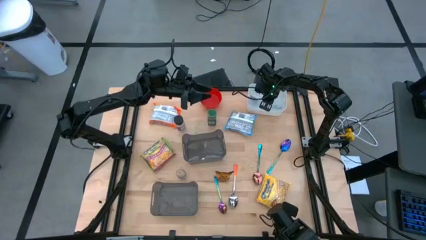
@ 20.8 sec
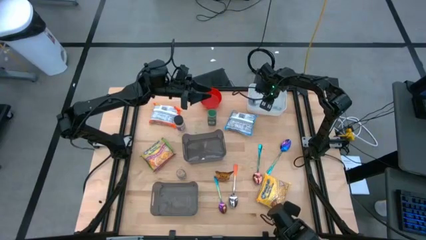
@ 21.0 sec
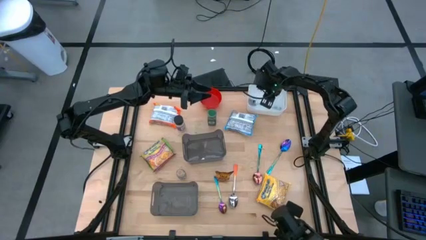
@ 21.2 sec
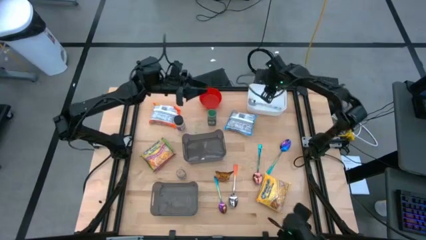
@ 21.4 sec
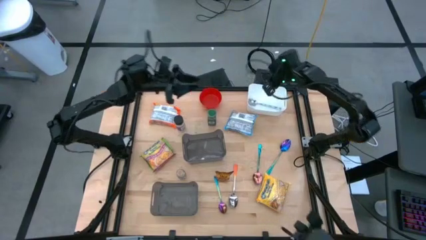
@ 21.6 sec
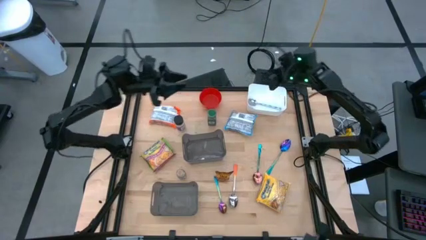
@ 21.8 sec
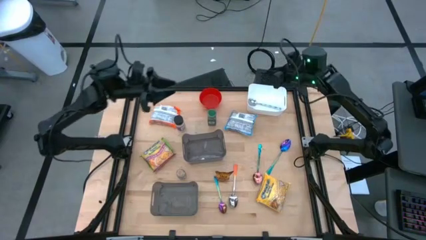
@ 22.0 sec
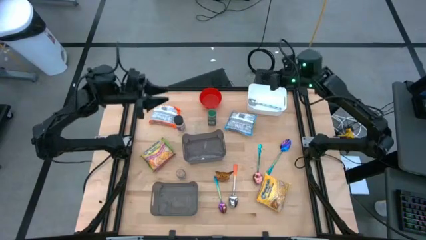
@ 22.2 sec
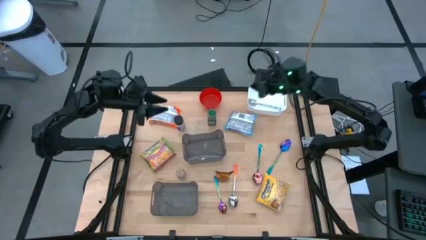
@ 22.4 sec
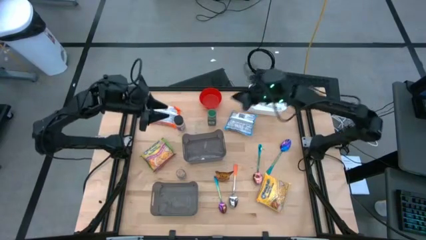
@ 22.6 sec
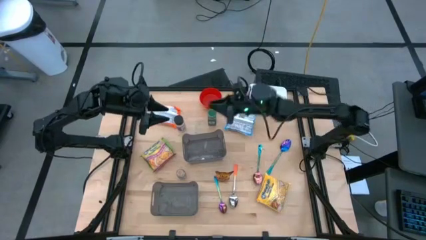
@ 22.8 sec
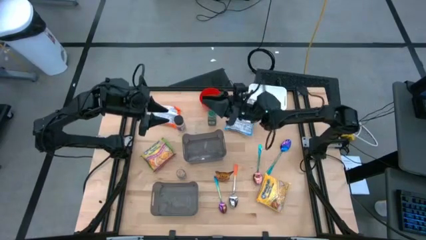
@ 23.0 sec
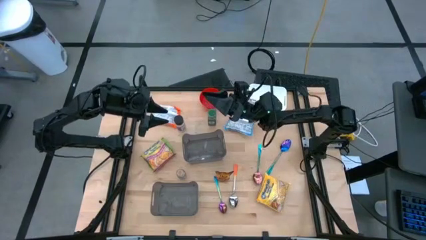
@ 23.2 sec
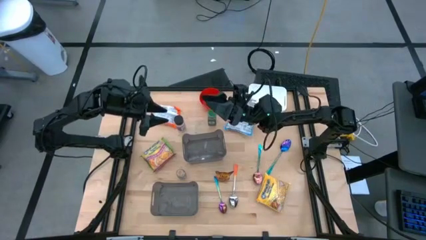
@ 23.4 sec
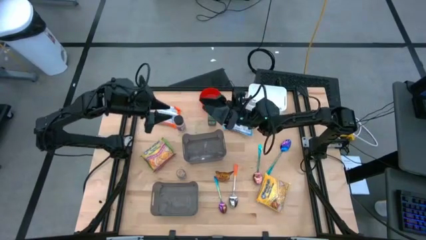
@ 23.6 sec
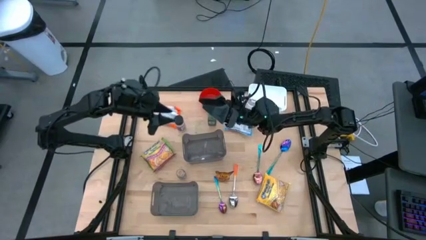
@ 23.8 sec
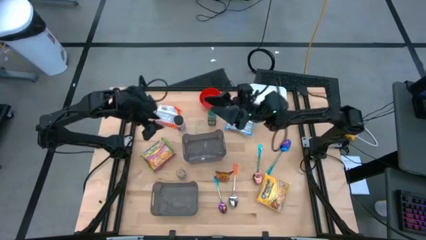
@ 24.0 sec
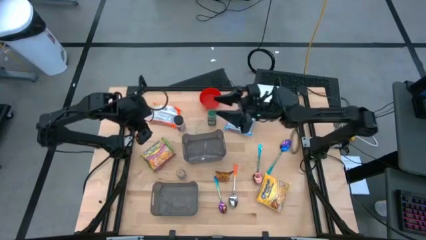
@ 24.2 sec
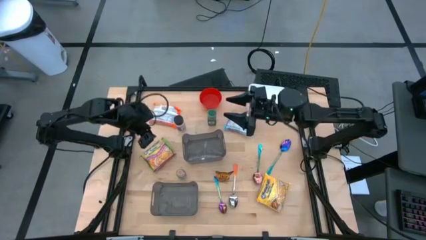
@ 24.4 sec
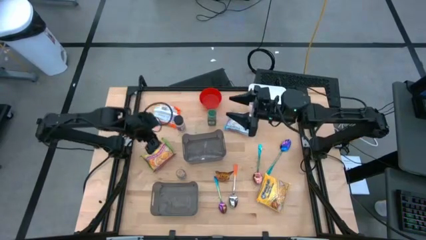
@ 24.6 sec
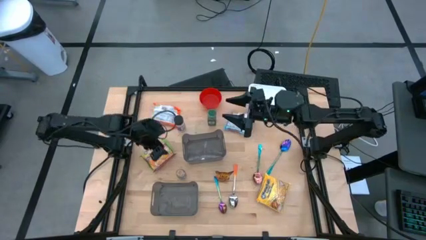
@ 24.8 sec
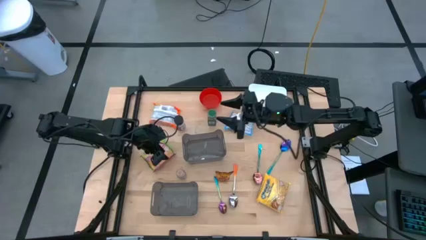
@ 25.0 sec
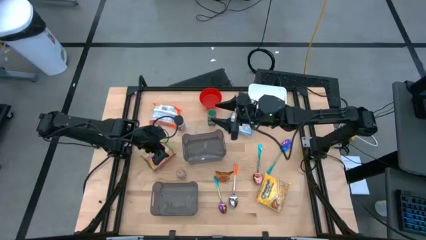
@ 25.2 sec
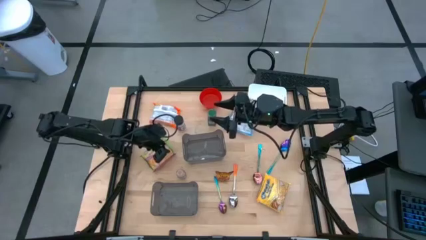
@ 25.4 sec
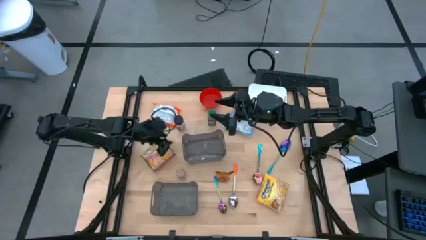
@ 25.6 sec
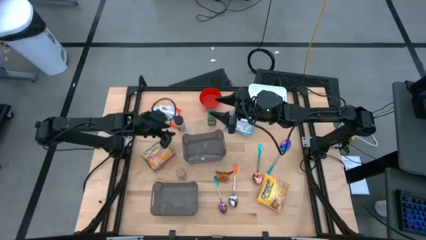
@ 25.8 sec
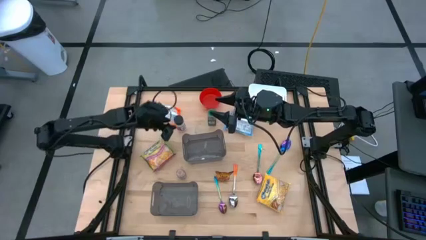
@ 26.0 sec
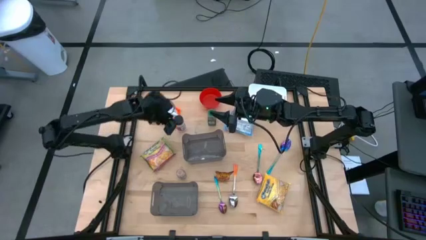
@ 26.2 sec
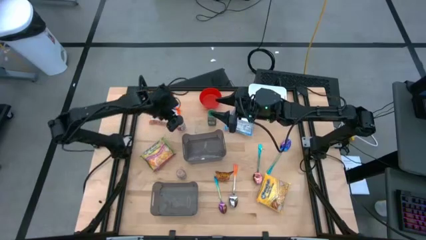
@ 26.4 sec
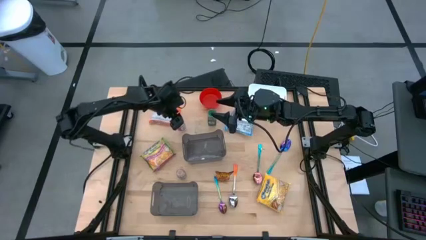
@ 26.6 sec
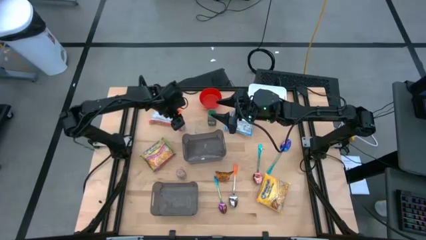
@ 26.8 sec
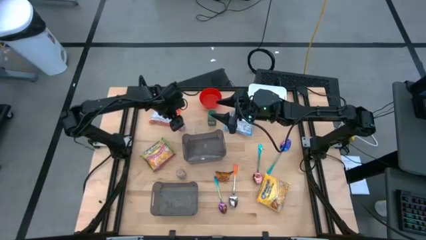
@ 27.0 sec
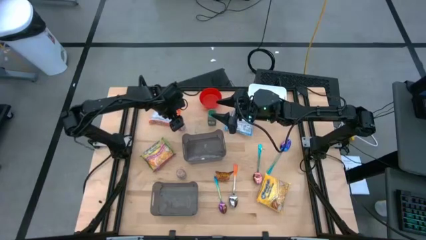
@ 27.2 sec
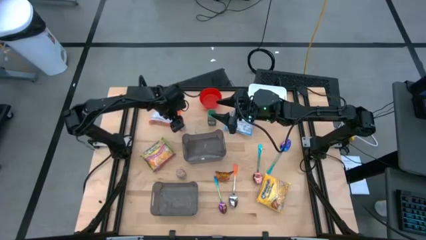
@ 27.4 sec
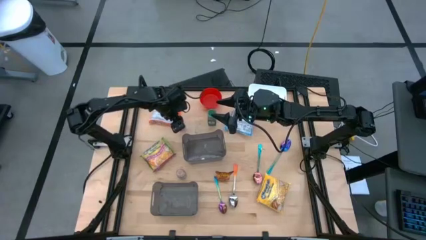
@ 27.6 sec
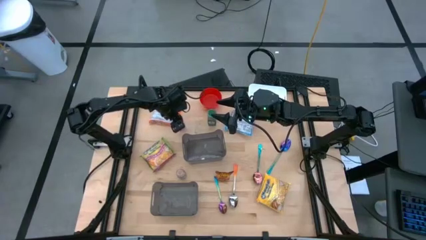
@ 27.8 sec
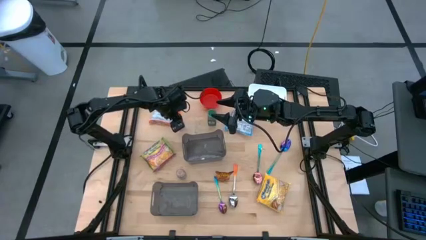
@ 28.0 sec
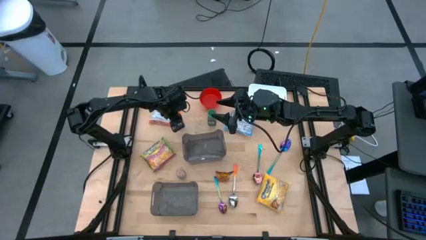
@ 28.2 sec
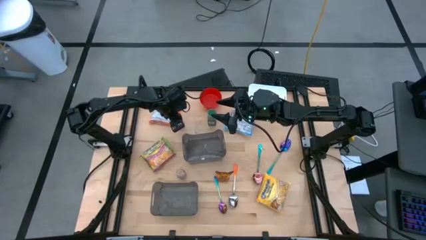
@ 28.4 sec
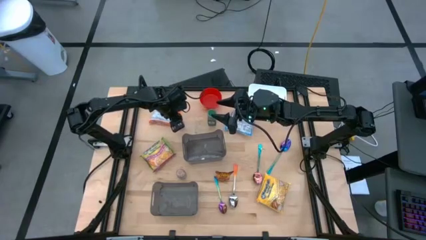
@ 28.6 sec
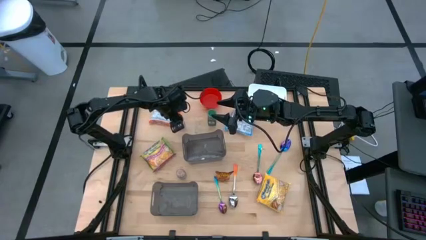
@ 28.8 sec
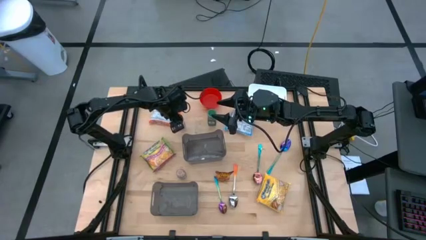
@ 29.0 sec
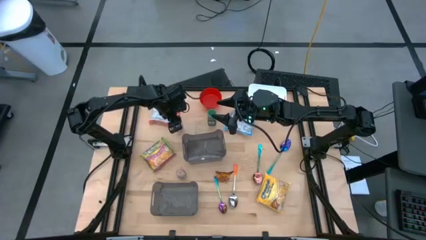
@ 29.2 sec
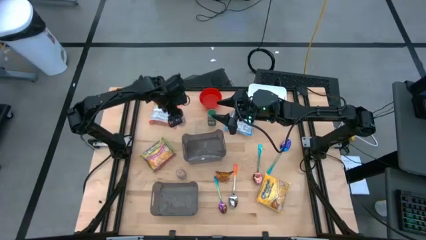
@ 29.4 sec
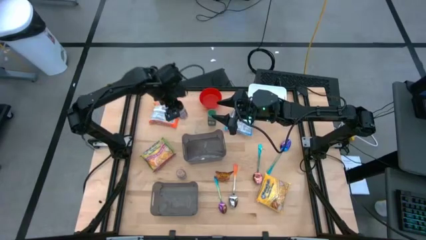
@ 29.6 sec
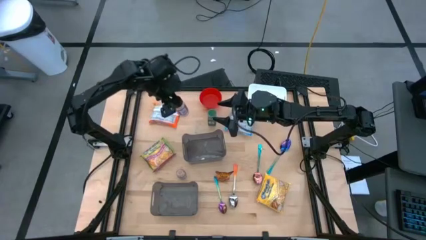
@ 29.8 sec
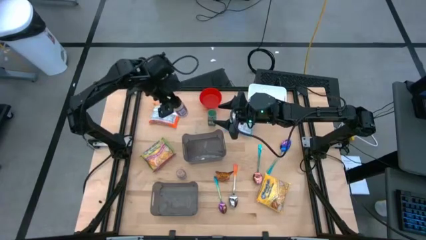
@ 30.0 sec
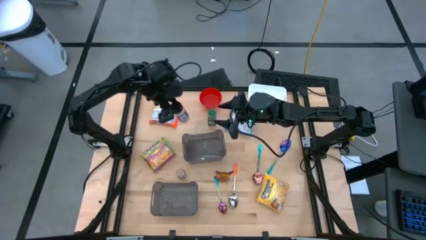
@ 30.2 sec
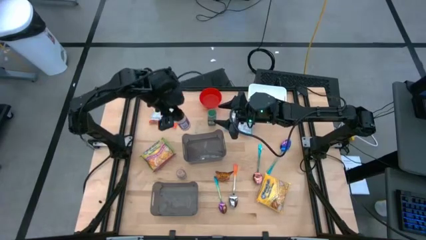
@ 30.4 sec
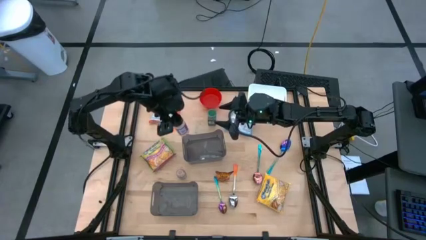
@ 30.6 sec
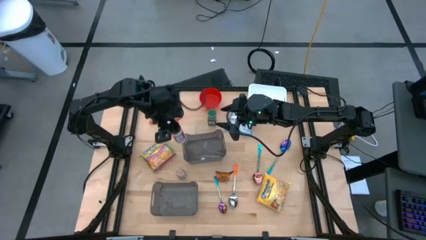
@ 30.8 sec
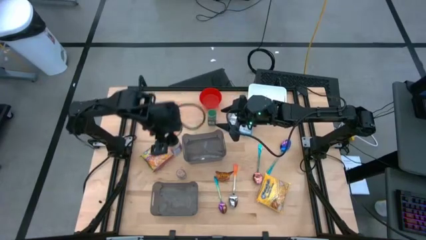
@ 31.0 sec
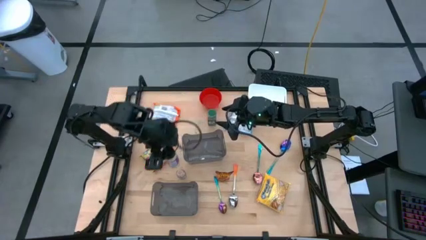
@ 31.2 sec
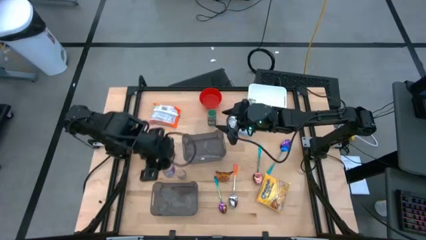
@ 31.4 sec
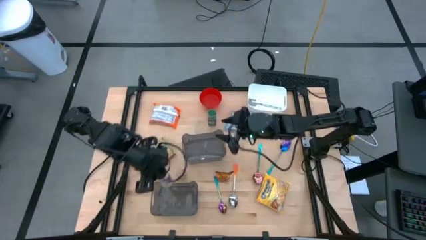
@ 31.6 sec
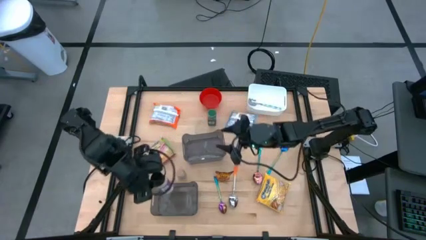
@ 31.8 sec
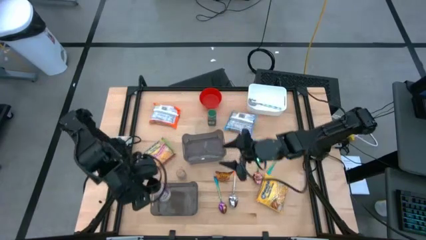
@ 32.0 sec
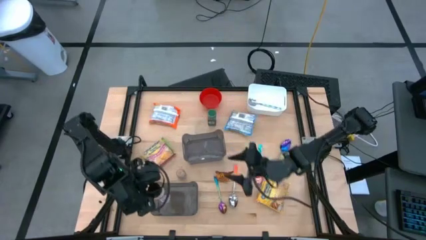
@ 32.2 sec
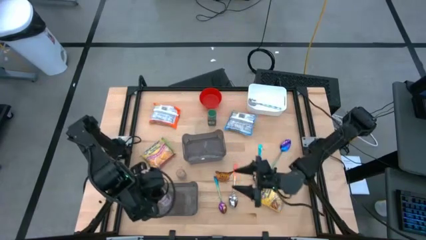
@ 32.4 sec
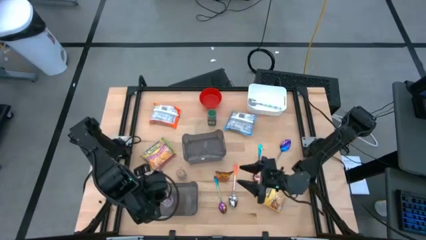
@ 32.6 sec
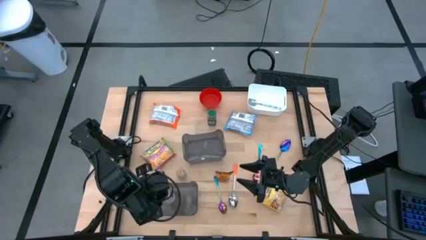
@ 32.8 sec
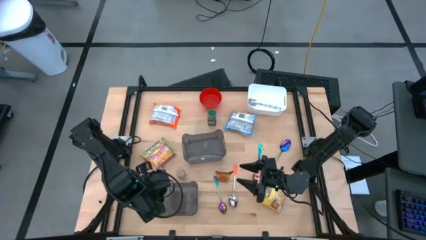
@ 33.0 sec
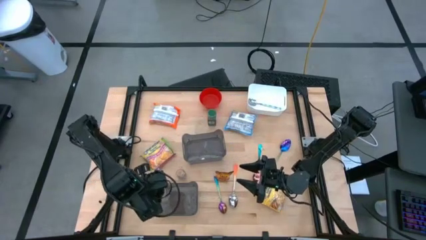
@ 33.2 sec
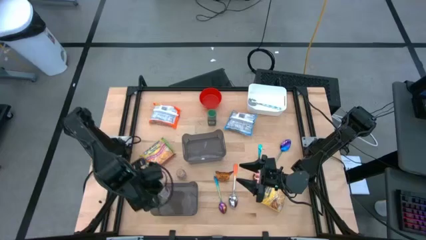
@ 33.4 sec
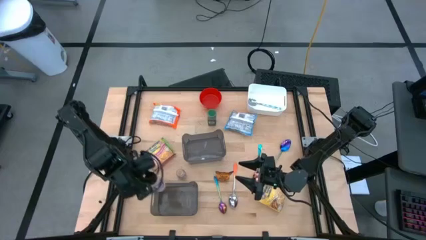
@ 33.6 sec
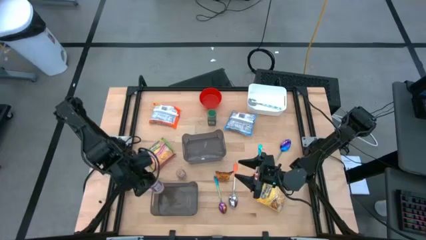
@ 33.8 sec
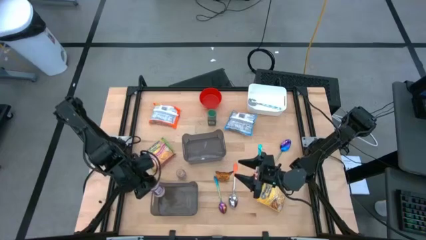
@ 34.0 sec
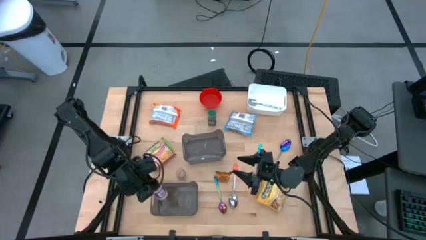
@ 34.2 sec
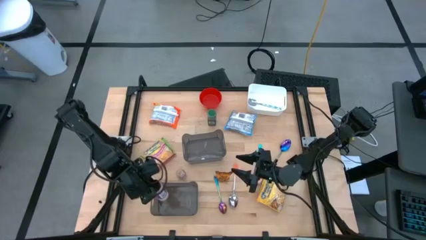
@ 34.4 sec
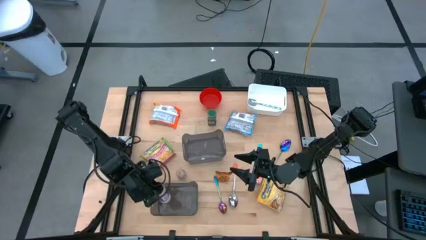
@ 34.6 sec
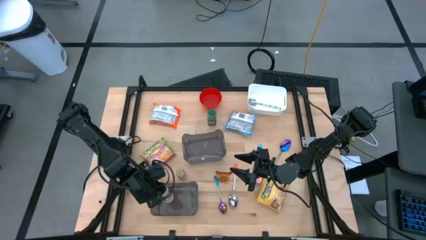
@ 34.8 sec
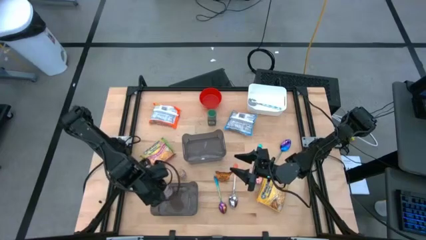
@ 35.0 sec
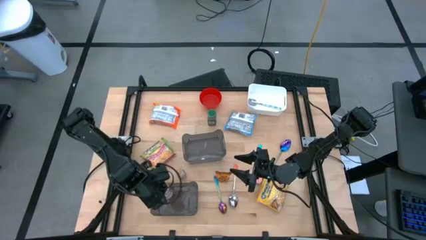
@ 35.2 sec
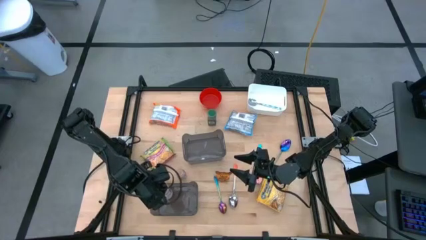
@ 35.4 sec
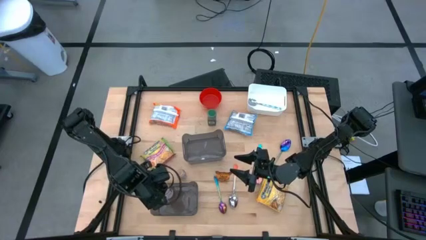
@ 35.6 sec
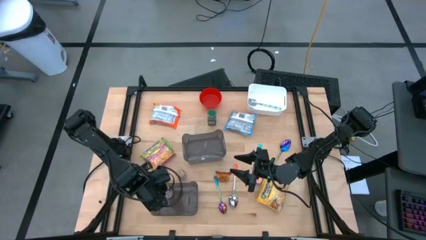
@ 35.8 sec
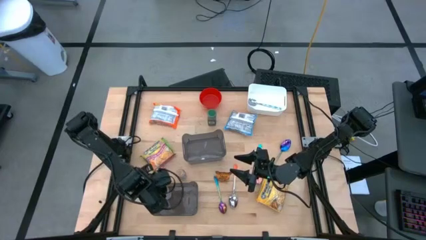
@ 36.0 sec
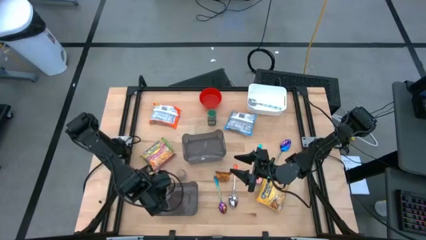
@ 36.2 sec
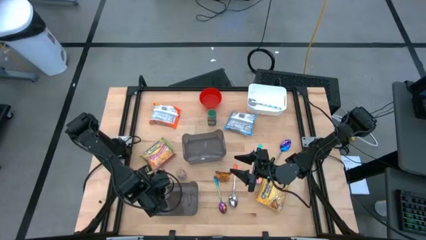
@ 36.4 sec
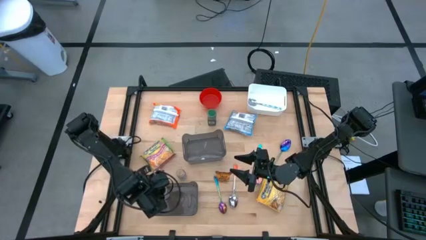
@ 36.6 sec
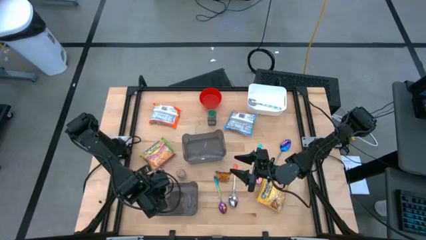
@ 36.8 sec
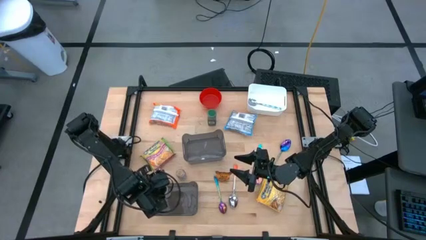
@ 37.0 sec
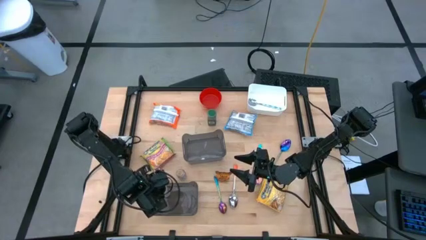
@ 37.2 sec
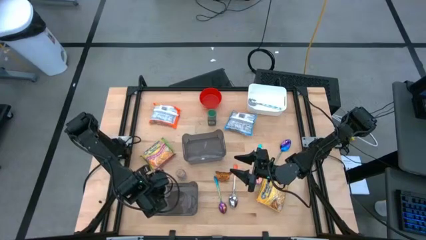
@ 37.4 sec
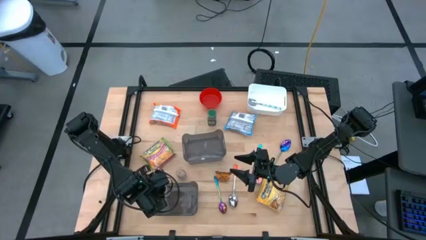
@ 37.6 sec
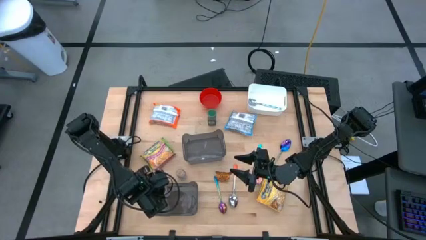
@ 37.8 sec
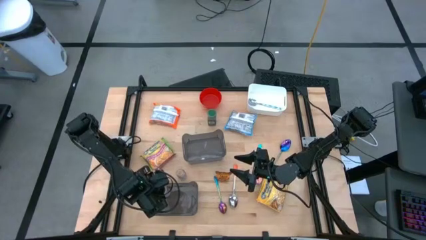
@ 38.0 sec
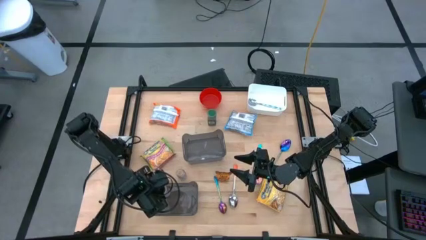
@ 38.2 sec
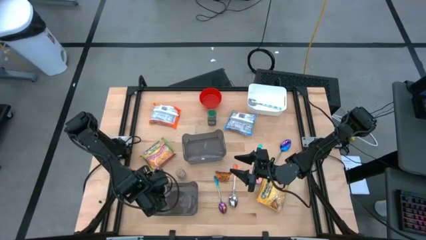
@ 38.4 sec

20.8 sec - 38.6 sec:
Task: Pick & Place Food Item
Put the purple seasoning bottle into the bottom black bin
